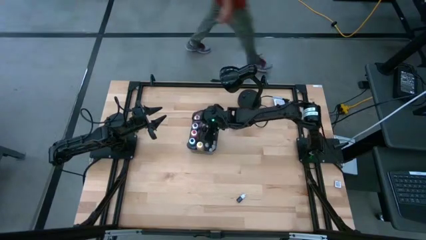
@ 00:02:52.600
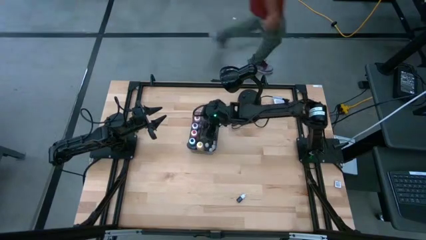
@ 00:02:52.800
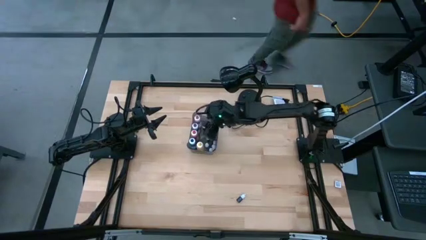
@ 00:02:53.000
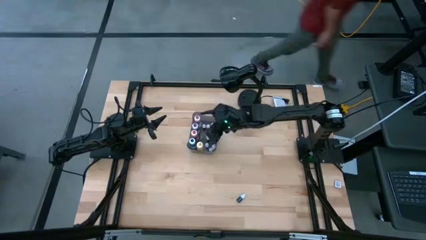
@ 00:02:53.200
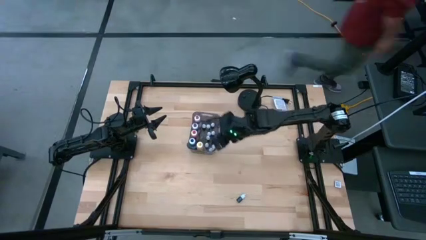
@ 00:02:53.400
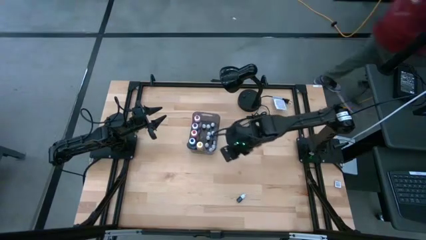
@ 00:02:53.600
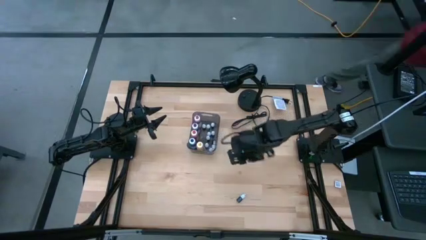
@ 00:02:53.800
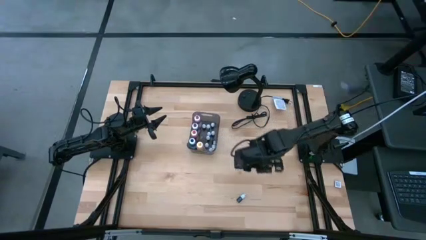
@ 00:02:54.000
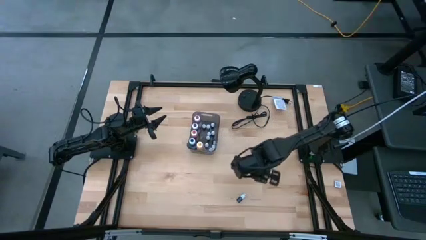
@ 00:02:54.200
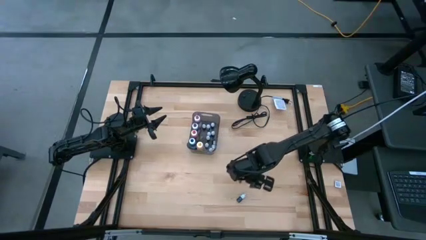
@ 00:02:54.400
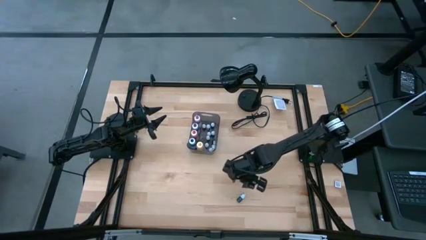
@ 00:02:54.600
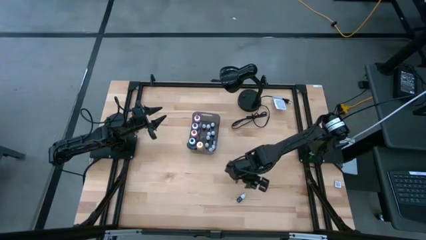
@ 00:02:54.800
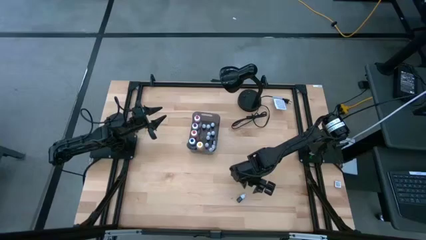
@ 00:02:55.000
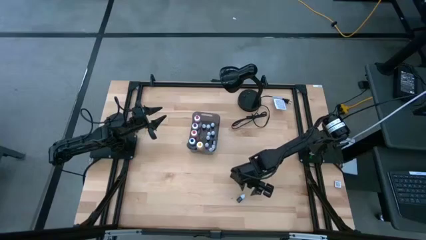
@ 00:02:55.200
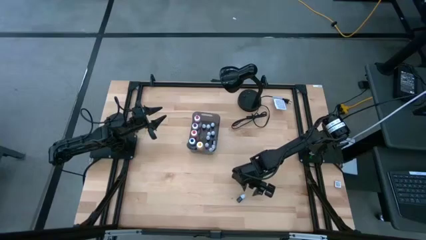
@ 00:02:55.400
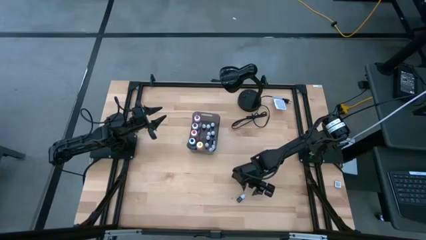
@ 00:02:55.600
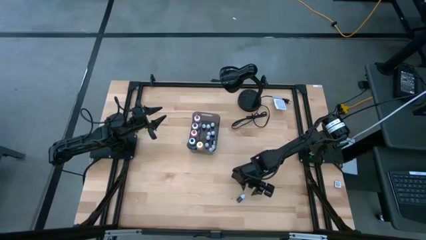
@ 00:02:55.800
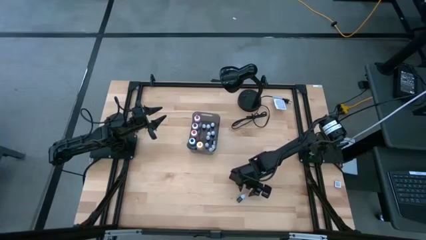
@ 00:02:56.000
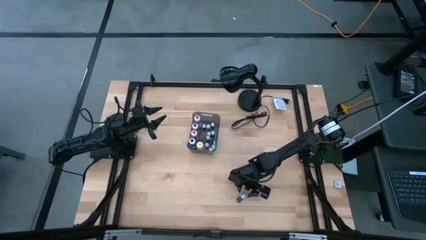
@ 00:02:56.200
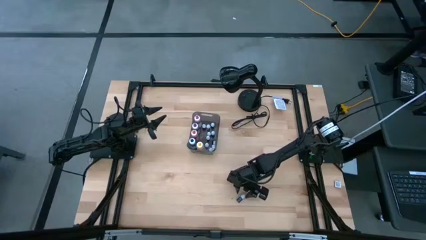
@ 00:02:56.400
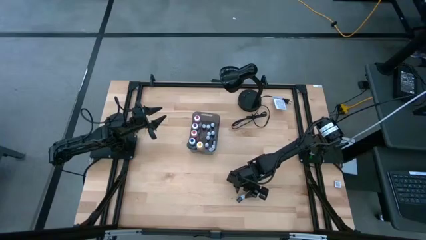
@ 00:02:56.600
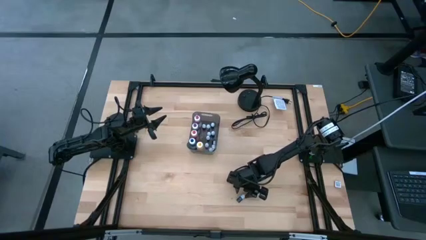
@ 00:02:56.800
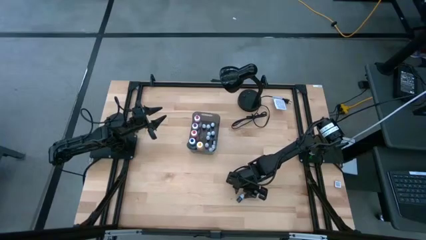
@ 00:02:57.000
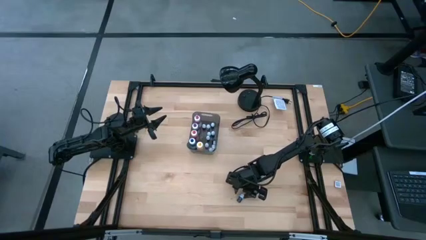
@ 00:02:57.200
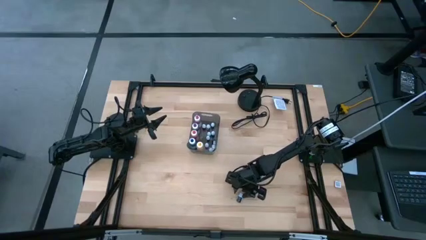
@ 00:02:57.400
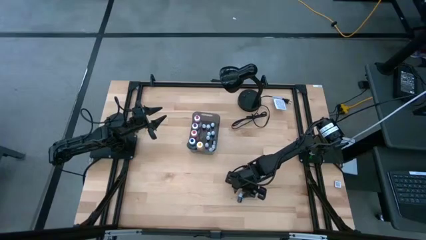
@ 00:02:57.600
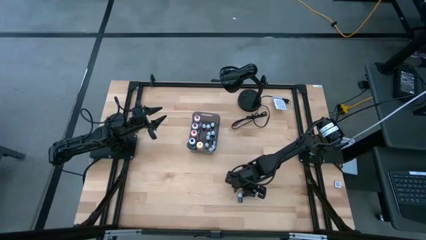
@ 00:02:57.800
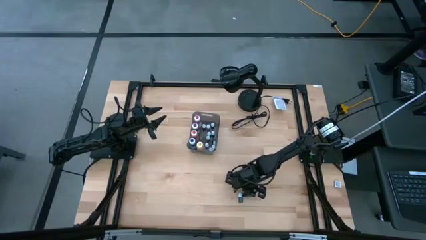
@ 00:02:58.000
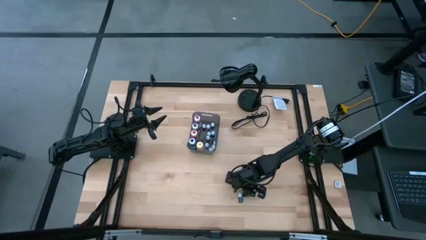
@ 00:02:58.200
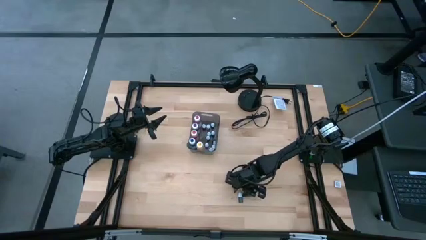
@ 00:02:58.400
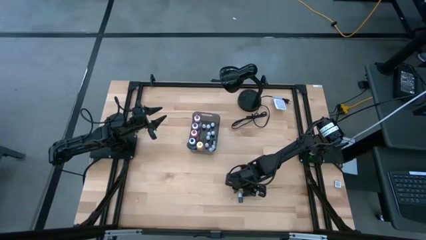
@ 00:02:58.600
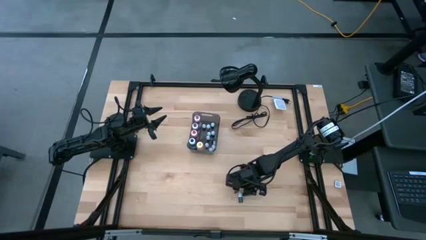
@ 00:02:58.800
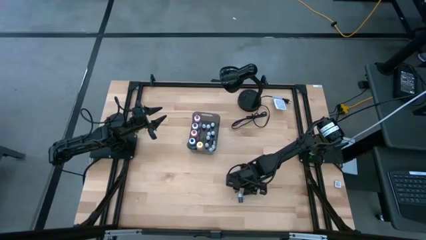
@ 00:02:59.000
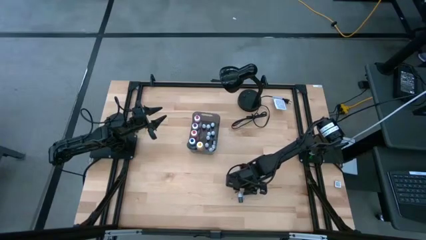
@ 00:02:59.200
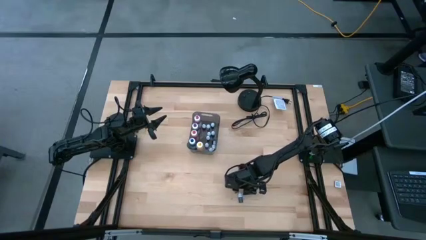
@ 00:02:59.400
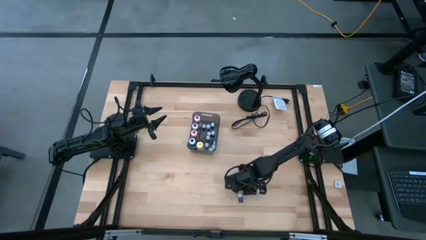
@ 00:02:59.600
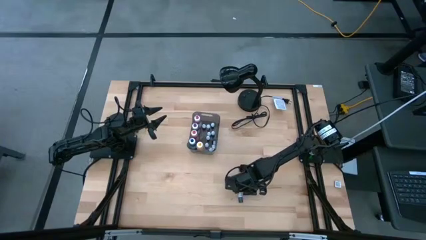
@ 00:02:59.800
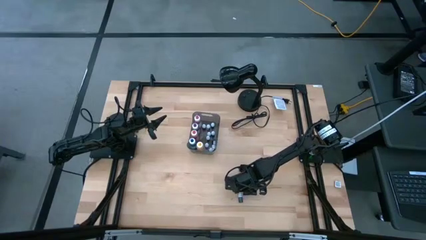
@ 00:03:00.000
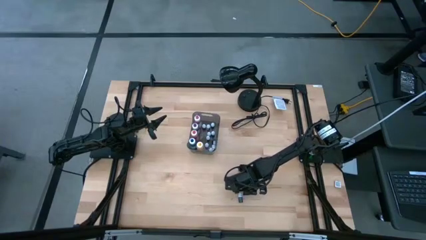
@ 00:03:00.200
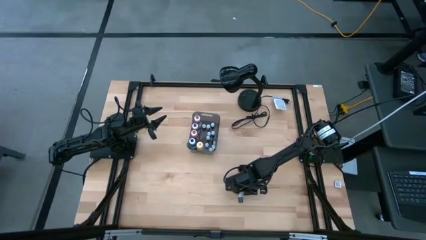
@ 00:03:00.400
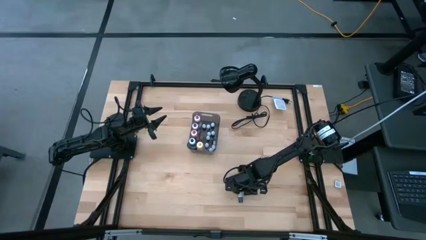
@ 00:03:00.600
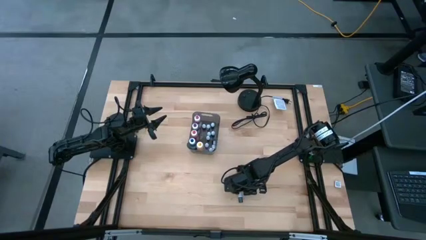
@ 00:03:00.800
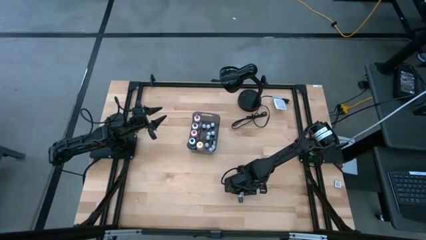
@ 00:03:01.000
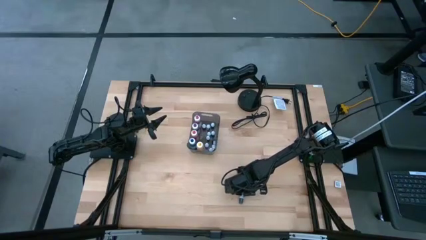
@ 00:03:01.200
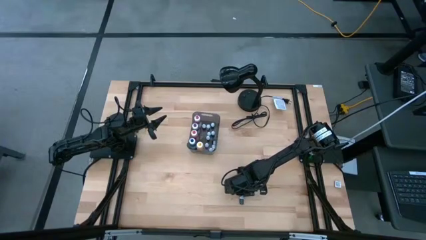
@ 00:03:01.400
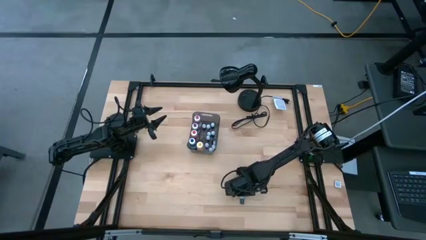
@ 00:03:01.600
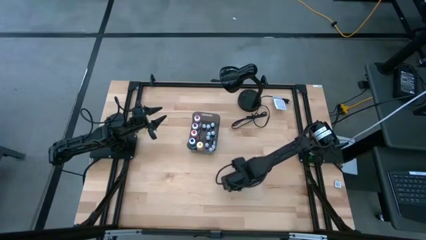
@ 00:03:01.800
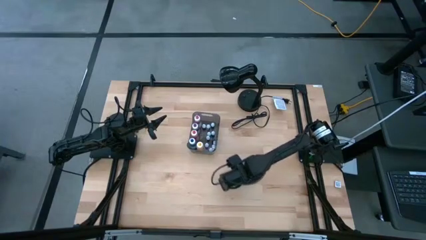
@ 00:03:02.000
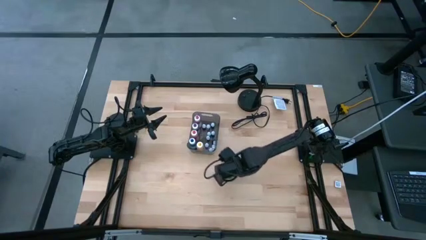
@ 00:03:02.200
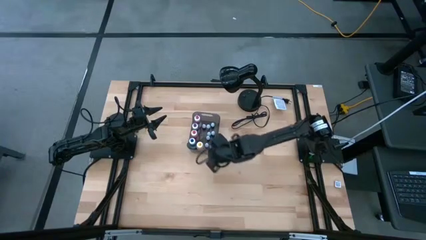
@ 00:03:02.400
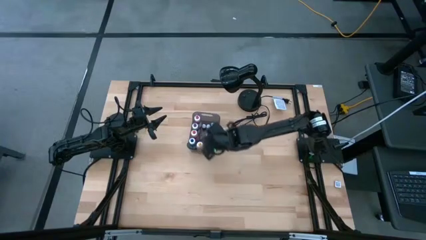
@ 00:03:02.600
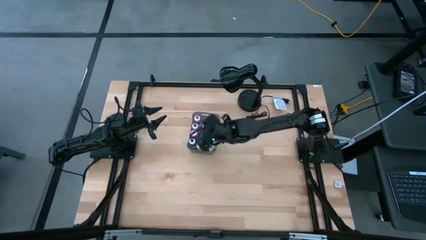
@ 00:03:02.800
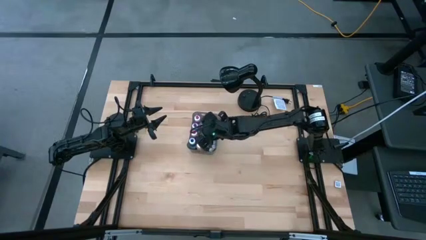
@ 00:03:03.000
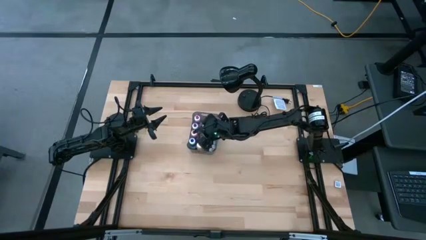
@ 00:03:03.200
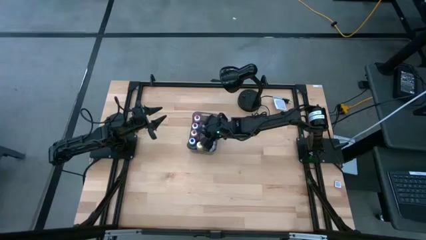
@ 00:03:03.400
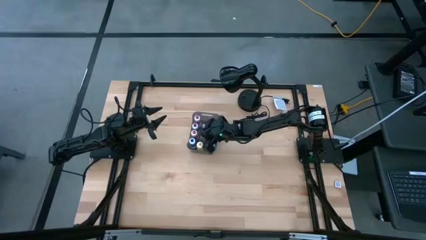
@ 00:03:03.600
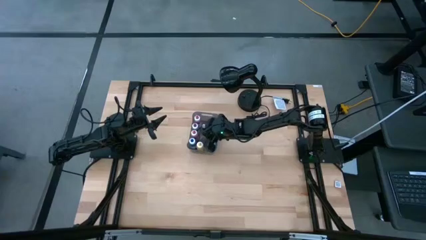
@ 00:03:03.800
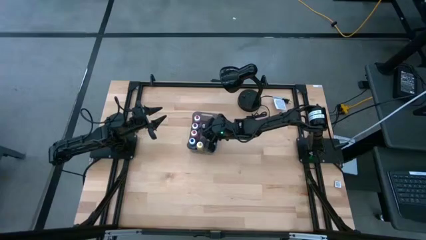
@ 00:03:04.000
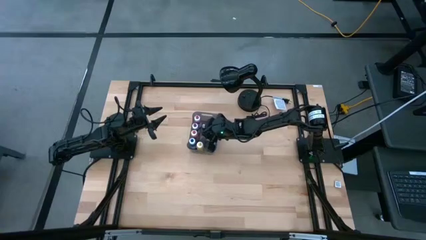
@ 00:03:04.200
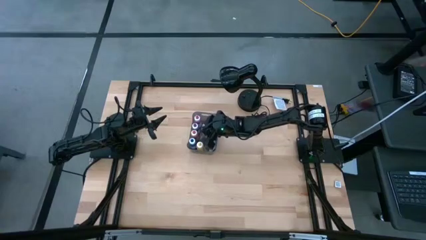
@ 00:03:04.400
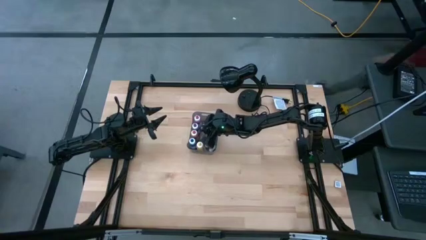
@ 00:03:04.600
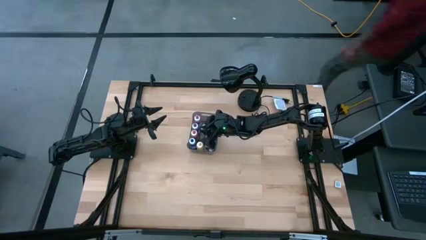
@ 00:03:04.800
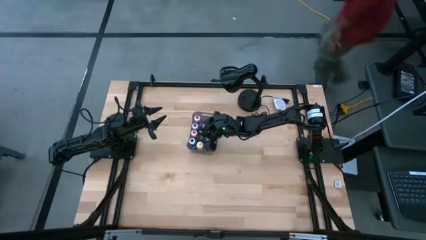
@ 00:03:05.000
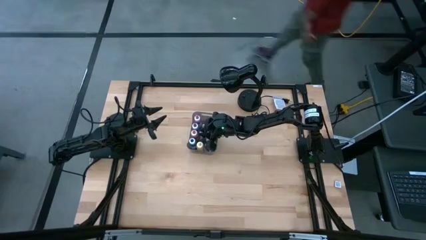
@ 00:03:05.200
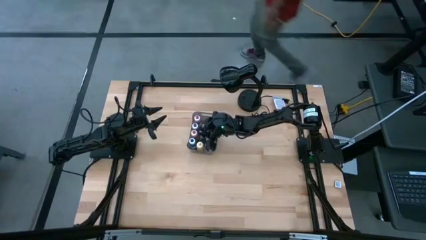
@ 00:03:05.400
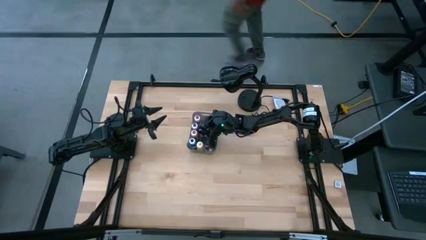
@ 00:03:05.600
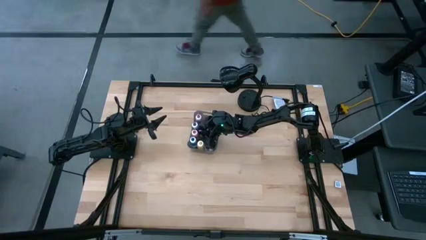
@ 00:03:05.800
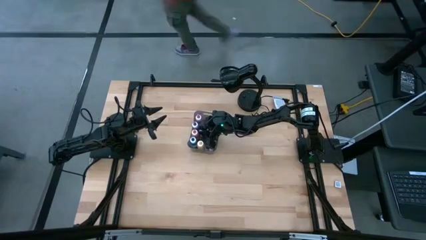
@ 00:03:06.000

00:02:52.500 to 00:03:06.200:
Task: Pick & Place food coloring
Put the small black food coloring bottle into the gray transparent bin

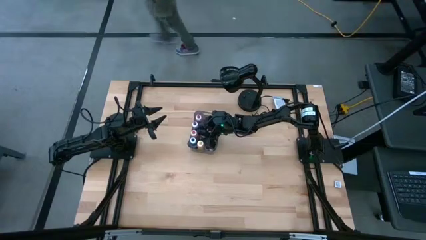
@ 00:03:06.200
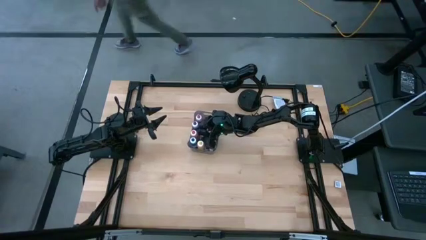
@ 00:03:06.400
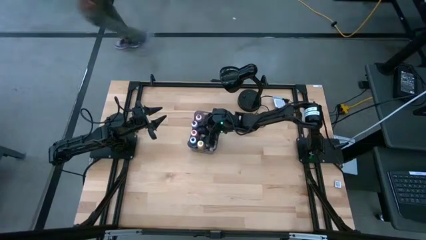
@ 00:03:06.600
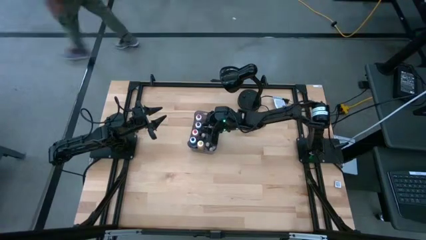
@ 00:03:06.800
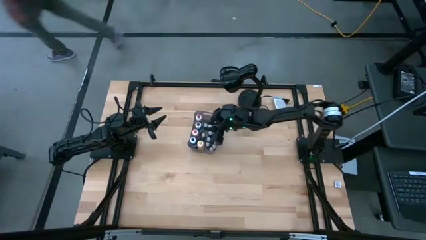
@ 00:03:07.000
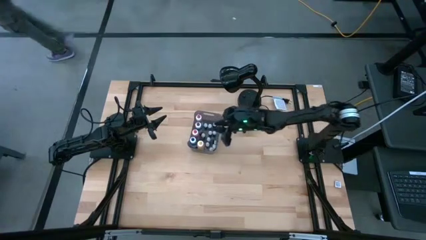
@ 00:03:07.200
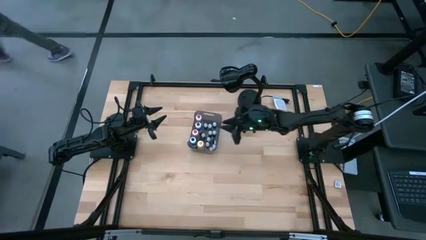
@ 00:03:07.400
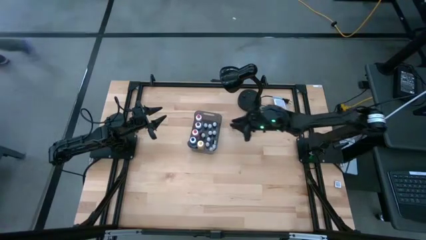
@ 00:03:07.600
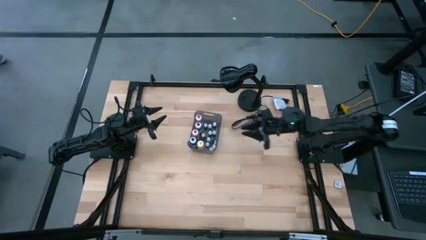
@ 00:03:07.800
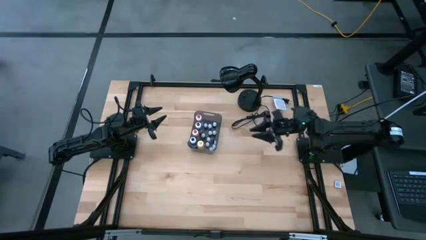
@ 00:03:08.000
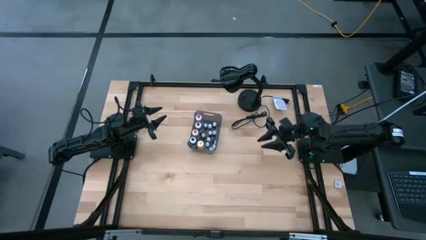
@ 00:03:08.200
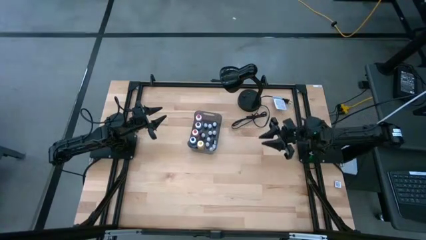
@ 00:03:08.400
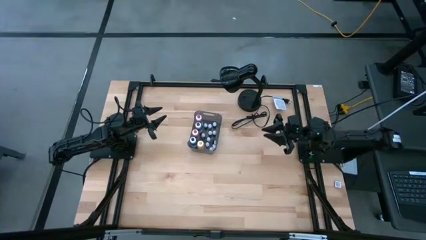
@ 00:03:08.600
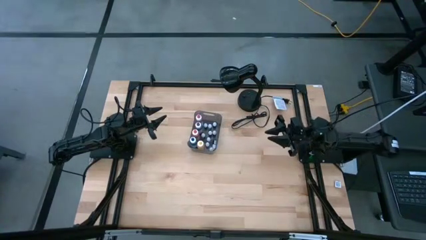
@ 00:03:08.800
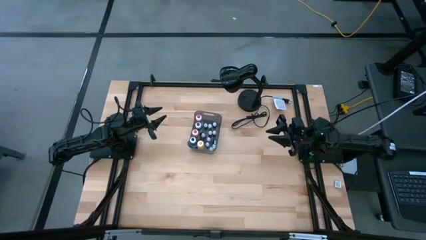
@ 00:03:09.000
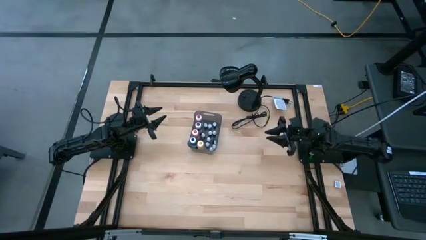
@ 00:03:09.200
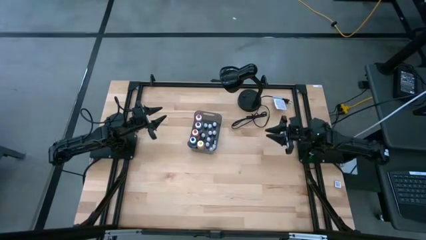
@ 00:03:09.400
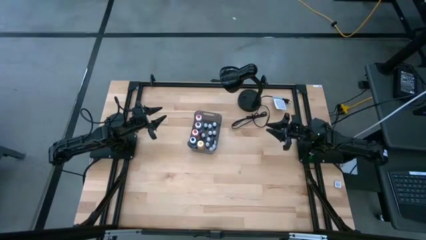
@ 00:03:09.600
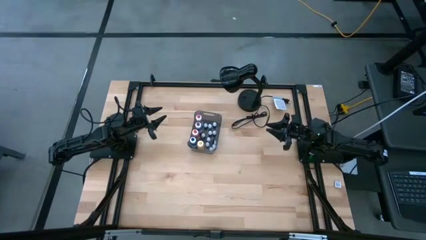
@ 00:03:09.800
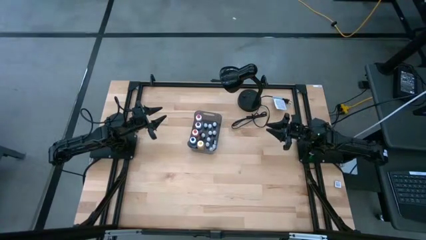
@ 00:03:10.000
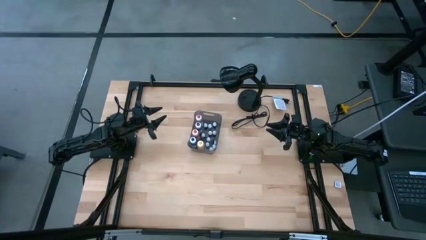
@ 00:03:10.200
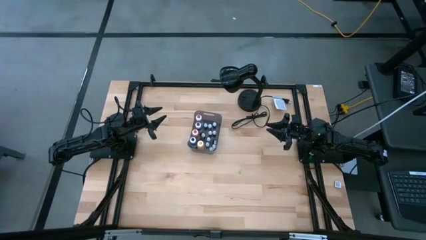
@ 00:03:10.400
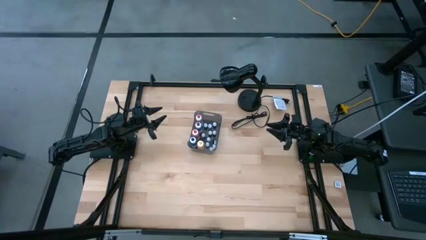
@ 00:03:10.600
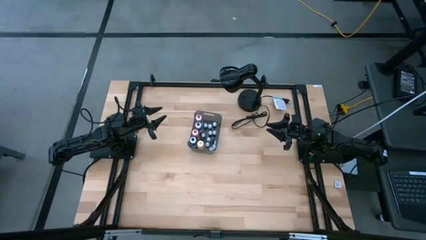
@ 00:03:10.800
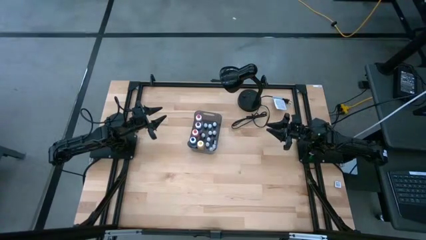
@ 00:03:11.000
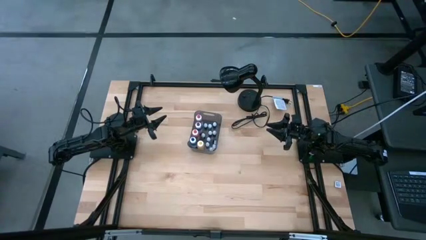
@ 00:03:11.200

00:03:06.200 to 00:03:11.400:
Return to Home Position
